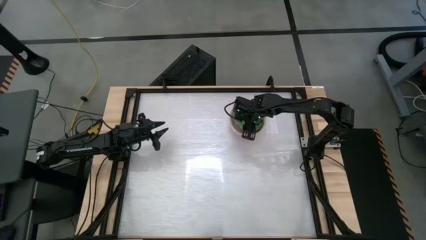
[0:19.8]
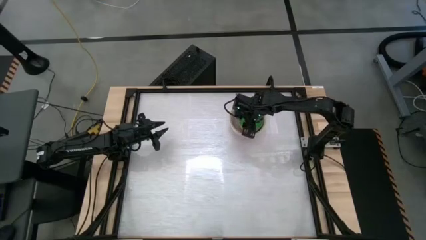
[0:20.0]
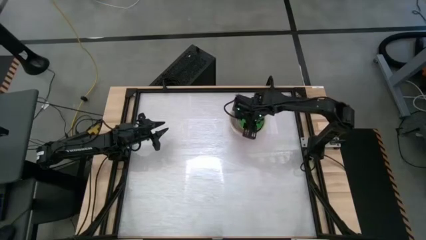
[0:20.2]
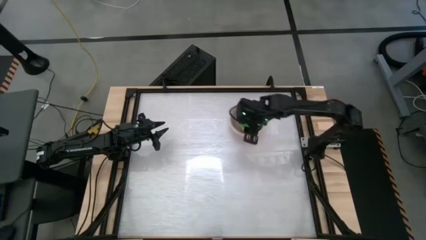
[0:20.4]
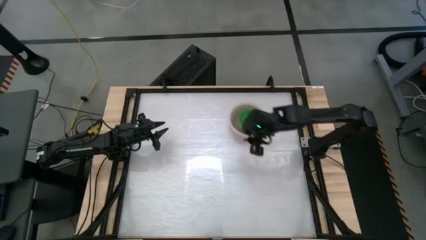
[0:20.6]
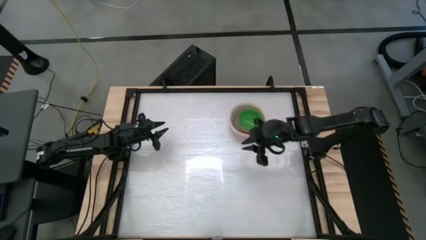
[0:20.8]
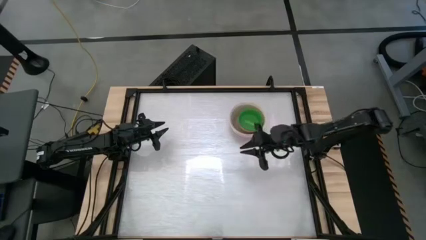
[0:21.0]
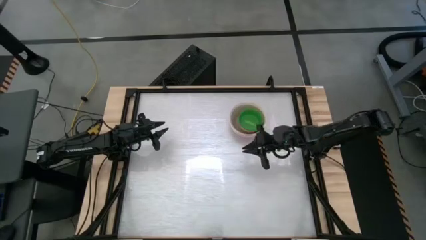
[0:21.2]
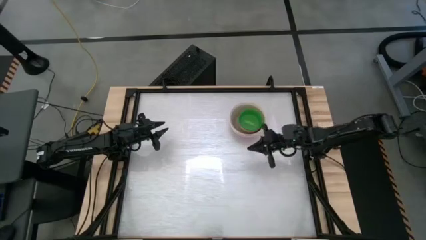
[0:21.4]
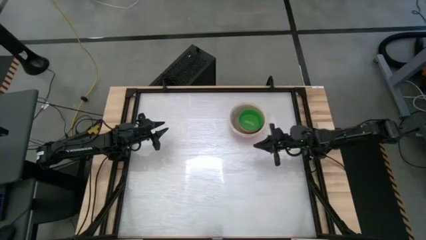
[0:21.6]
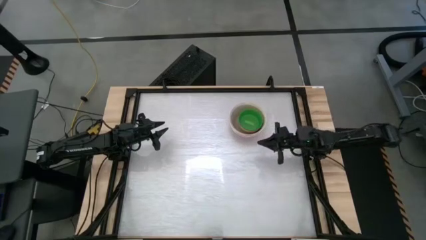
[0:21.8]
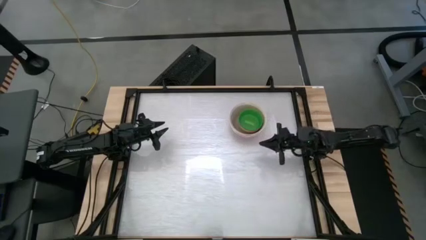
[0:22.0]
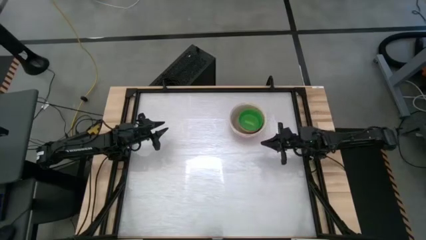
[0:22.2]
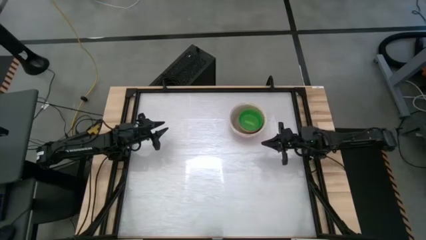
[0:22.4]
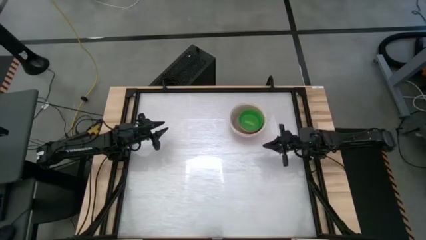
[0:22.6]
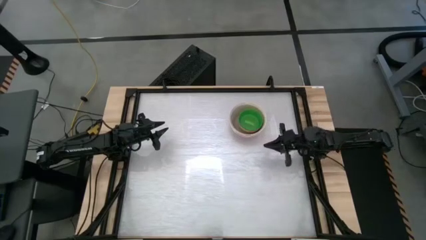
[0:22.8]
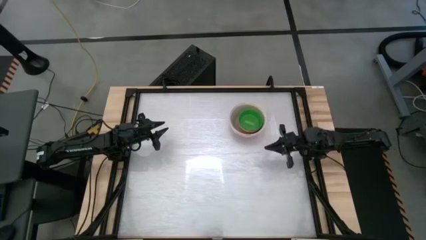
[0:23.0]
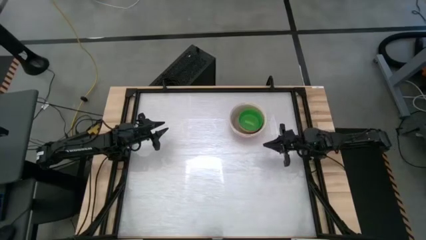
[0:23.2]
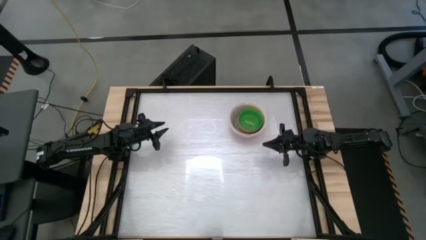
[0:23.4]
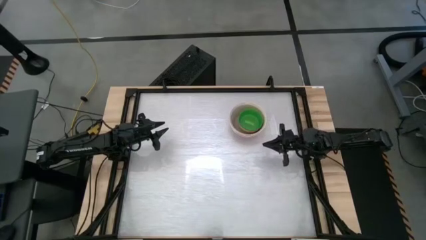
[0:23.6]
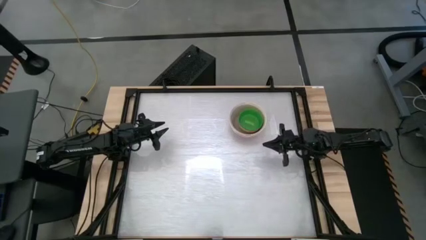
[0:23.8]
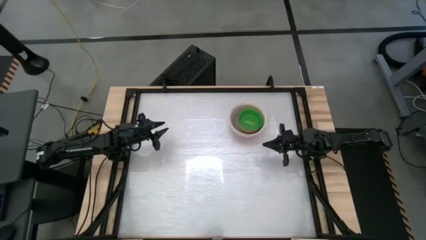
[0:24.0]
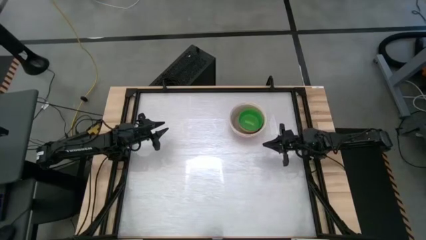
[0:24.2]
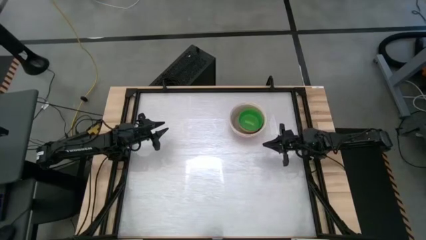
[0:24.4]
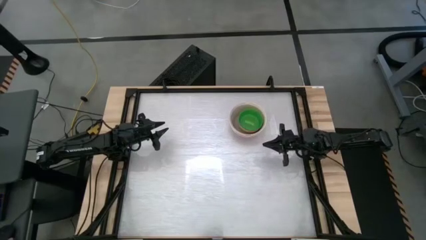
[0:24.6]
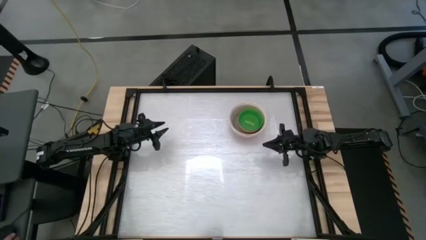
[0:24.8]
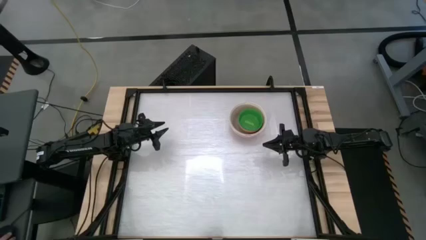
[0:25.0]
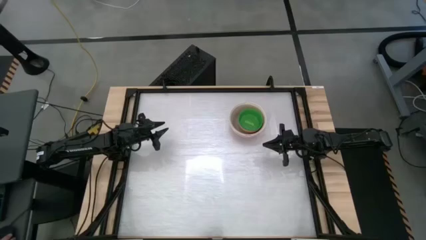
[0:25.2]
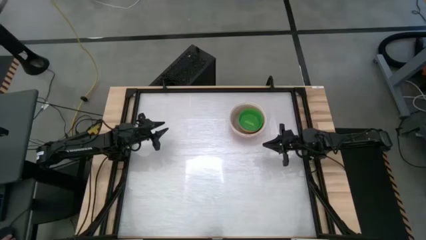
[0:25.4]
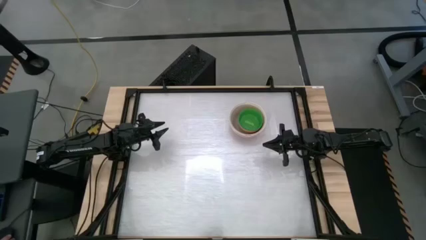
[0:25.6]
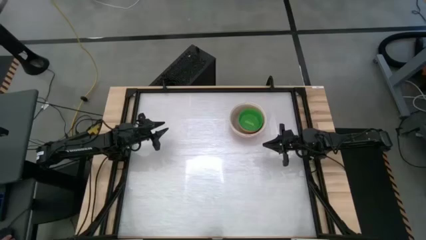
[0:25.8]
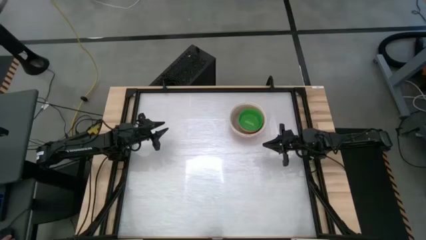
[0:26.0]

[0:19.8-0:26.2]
Return to Home Position

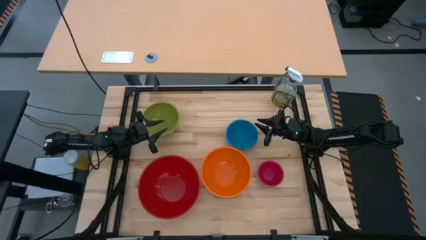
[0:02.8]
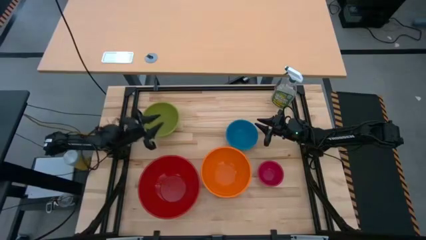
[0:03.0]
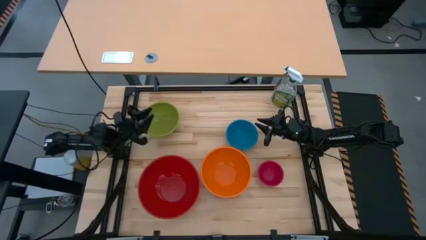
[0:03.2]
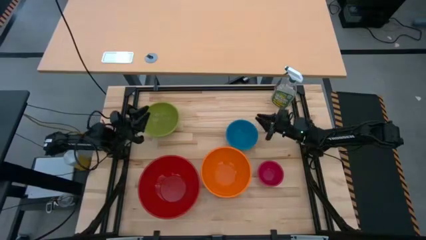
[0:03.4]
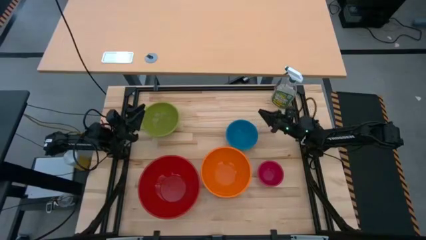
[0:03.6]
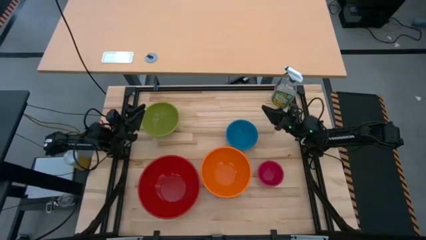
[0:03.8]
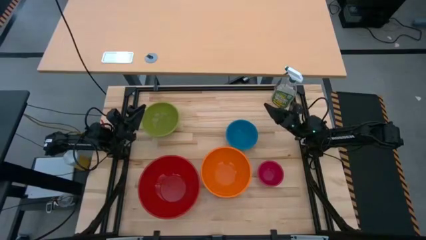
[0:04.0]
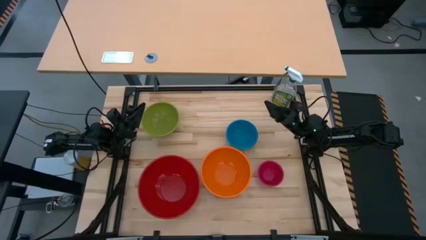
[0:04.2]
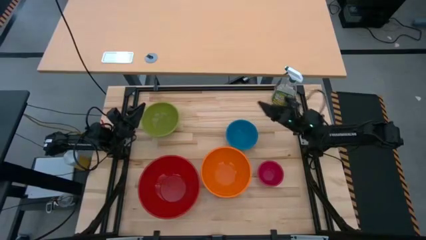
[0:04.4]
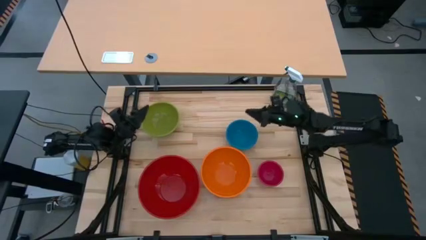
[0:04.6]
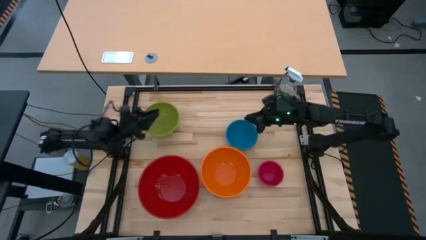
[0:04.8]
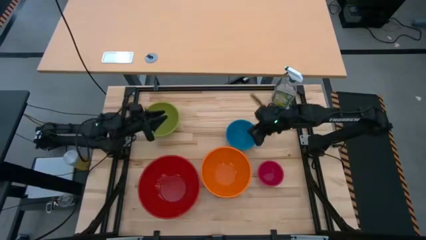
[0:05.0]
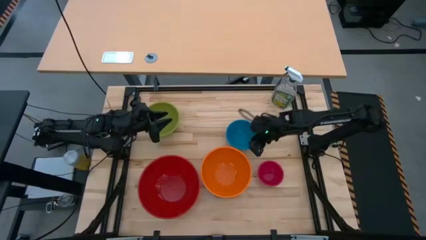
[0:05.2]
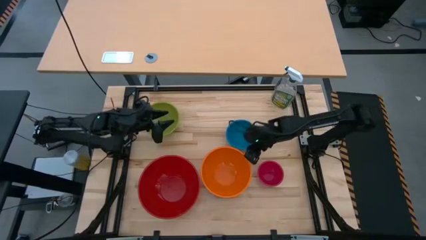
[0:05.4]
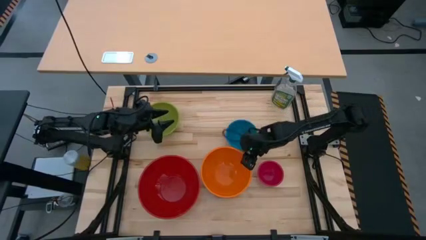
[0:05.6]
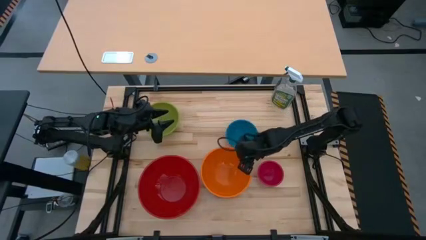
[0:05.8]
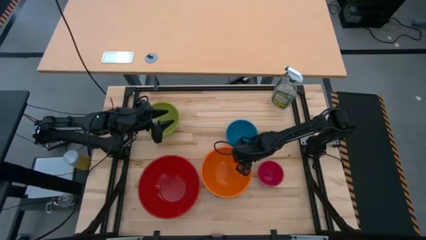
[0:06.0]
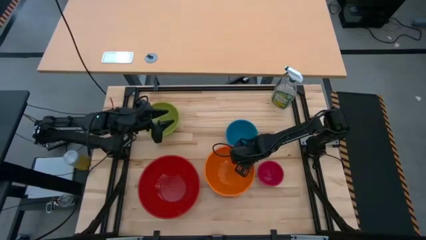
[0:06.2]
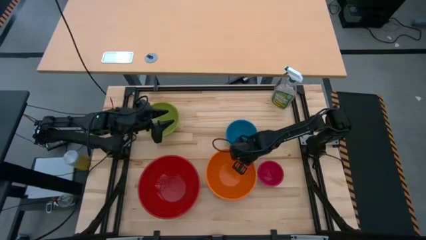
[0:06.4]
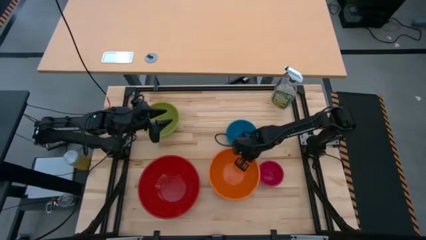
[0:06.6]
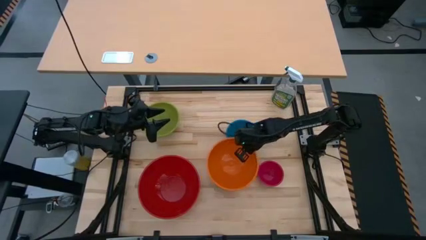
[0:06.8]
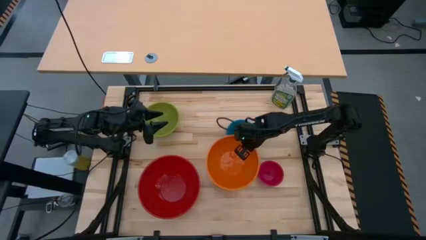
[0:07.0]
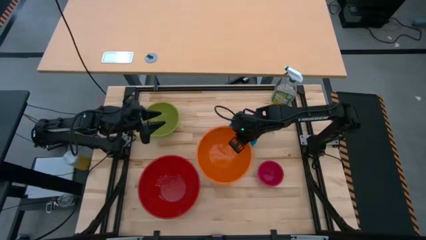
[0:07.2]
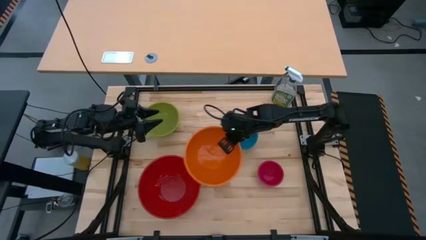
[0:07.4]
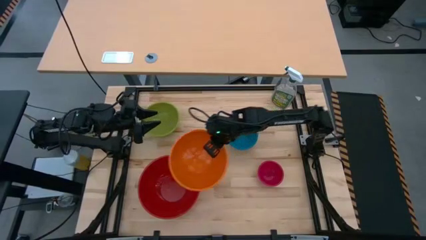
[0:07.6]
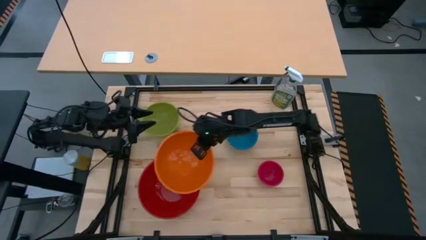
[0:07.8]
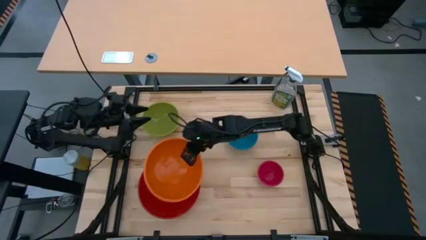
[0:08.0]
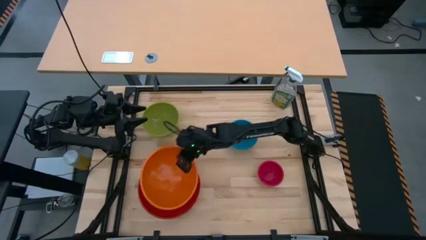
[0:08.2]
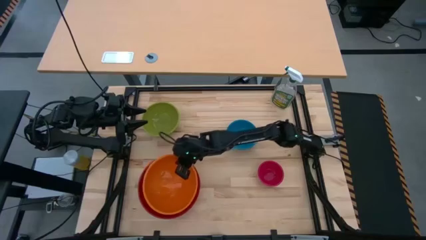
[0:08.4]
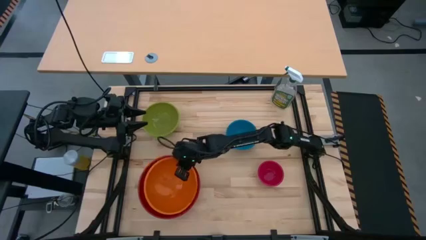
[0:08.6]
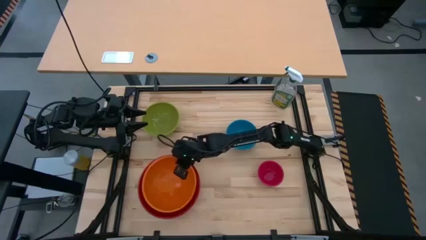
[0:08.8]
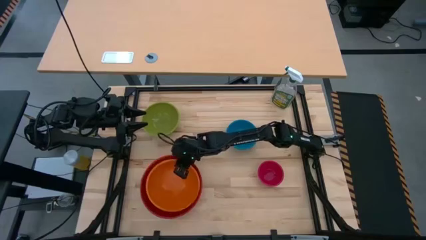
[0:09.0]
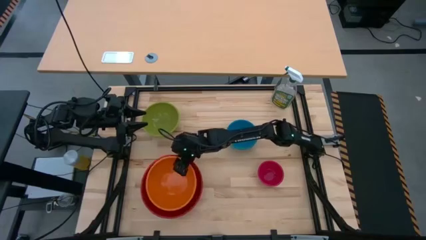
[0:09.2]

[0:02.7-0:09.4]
Stack the orange bowl on top of the red bowl

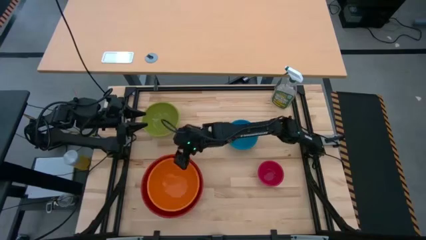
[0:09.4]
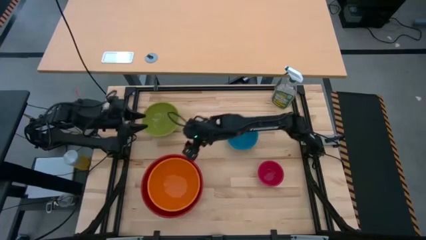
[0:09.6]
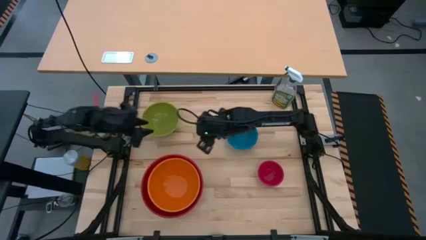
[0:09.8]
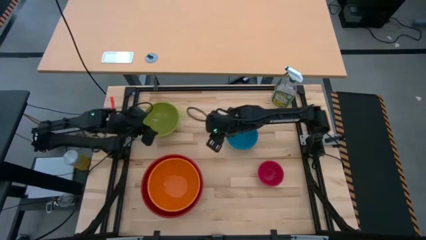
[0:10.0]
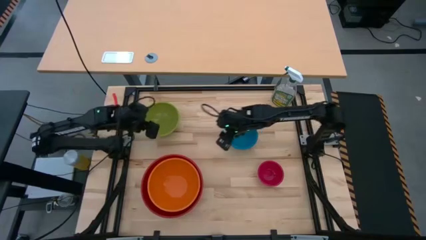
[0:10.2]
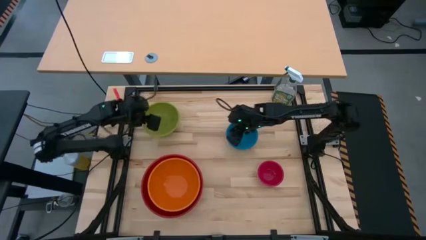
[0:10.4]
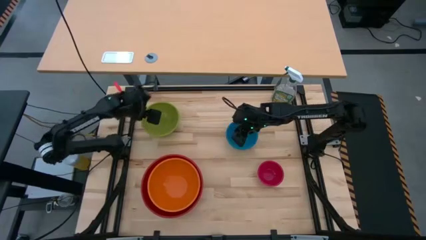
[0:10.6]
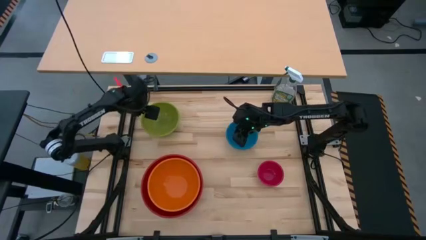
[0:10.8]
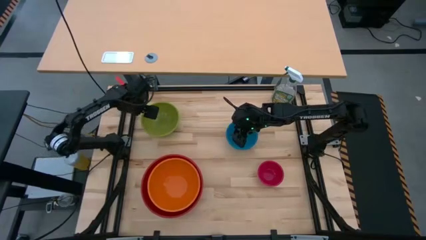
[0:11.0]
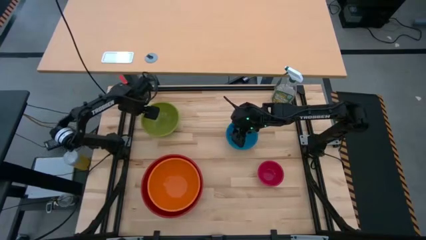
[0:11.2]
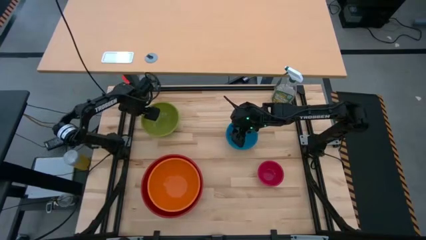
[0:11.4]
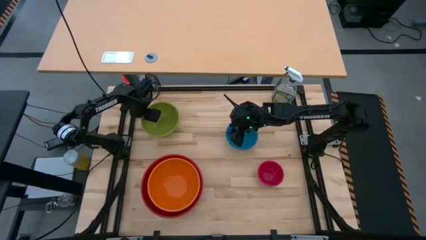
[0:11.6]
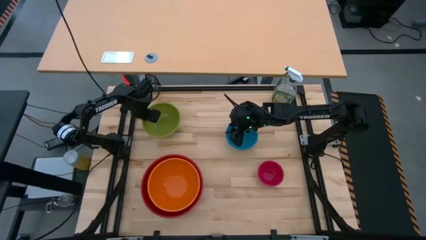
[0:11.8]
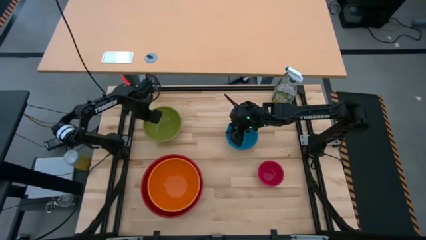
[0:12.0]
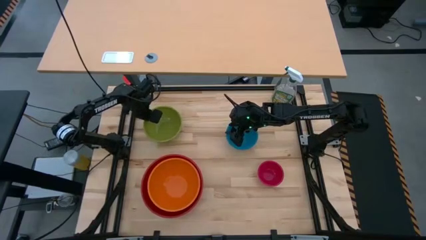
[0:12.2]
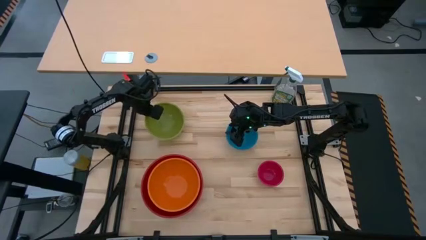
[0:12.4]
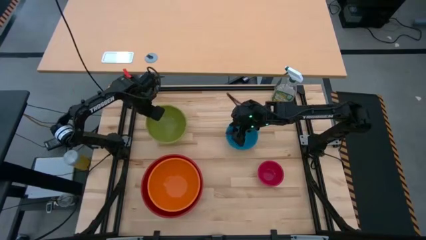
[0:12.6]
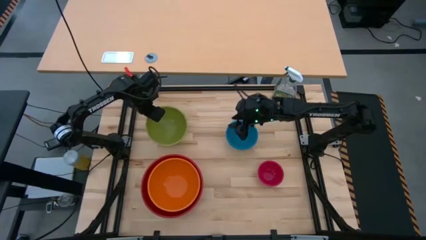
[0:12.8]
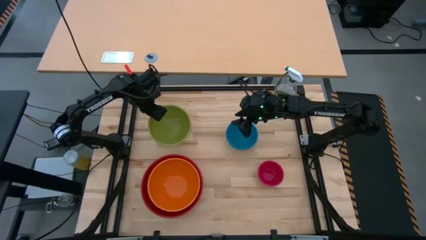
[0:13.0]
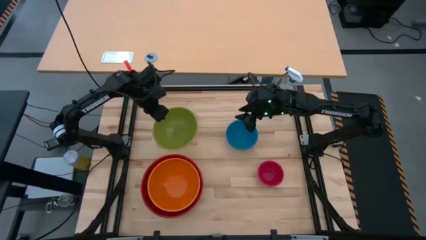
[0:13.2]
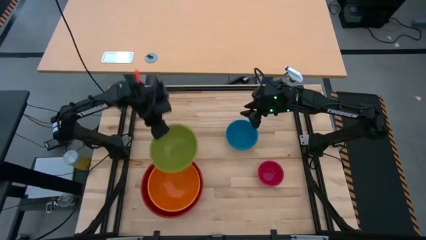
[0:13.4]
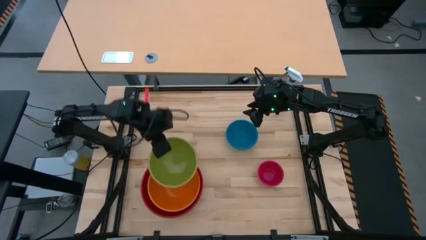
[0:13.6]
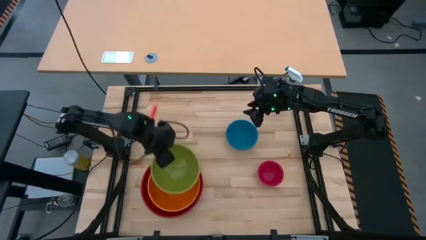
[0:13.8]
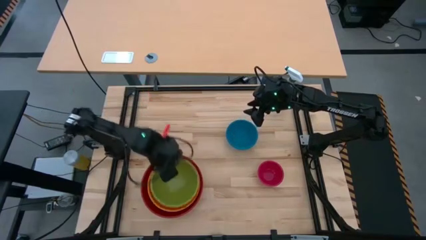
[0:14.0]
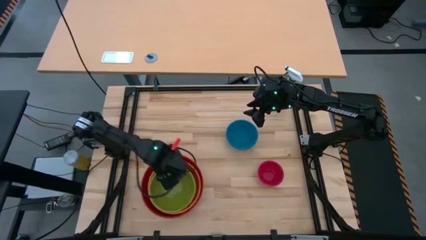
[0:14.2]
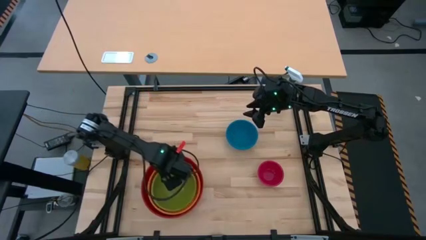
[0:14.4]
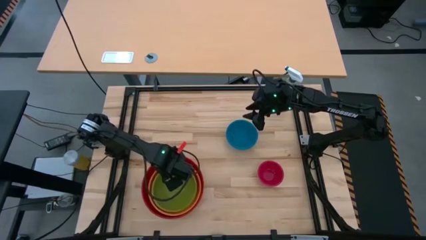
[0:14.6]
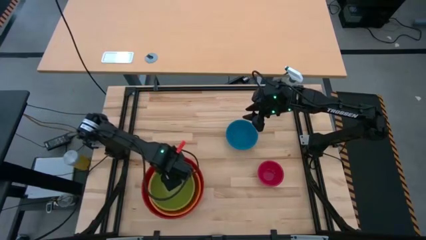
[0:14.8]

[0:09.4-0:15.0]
Stack the green bowl on top of the orange bowl
